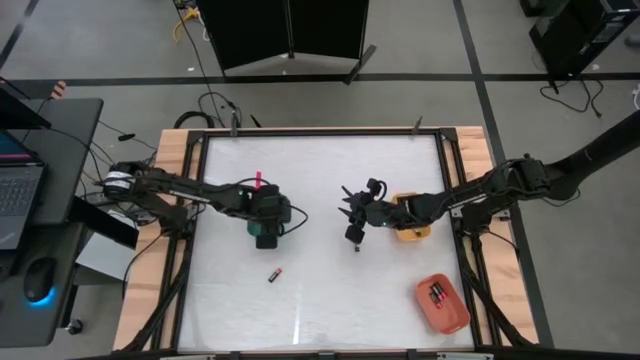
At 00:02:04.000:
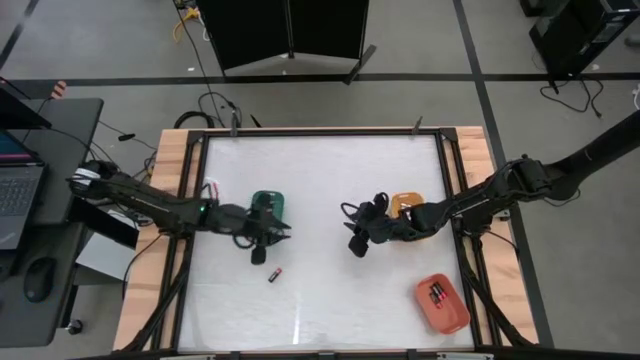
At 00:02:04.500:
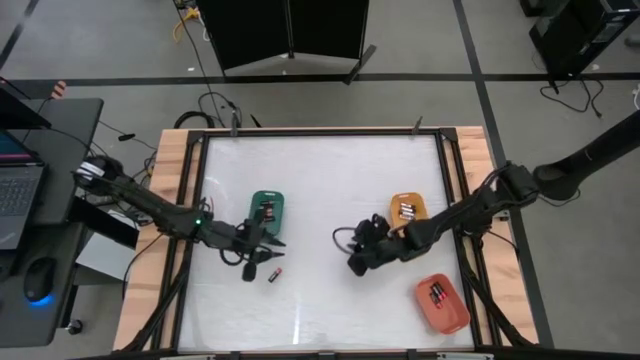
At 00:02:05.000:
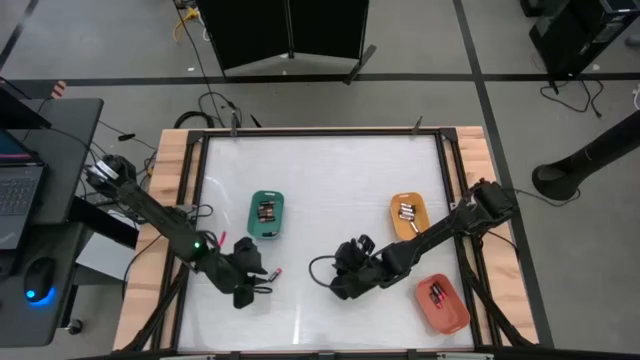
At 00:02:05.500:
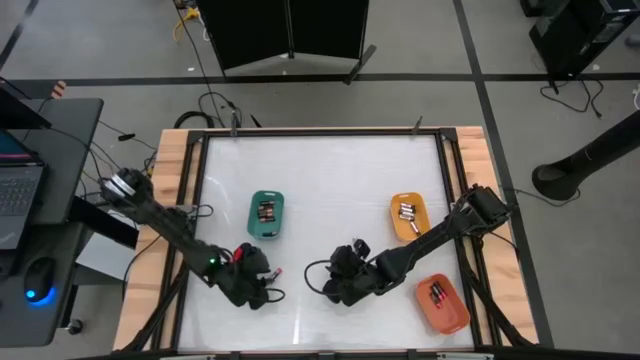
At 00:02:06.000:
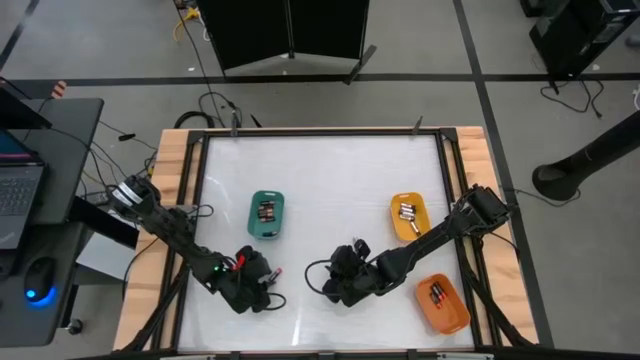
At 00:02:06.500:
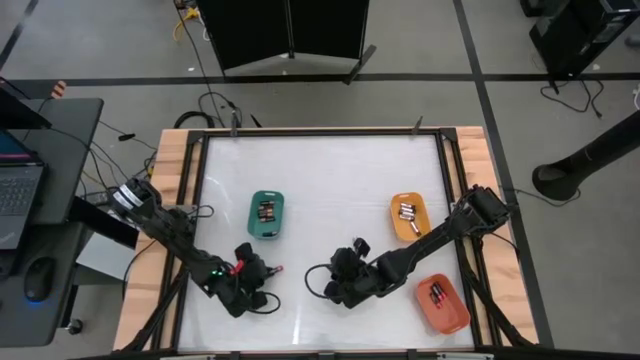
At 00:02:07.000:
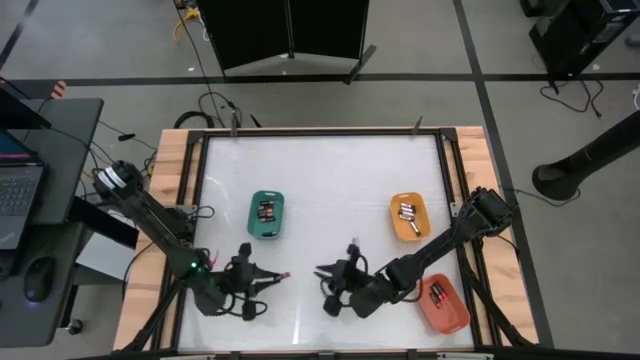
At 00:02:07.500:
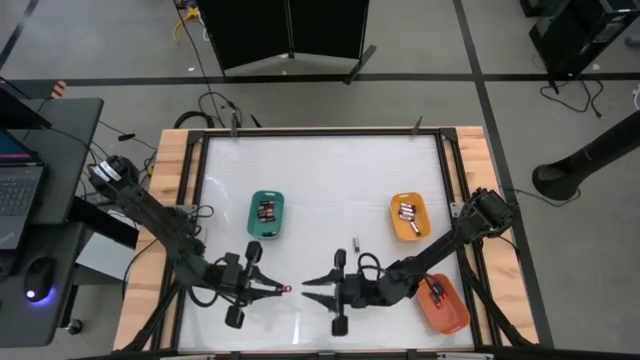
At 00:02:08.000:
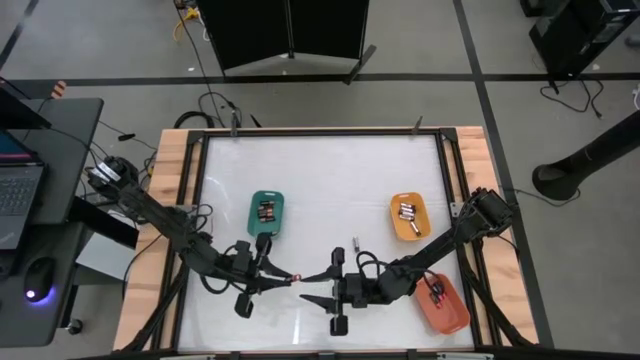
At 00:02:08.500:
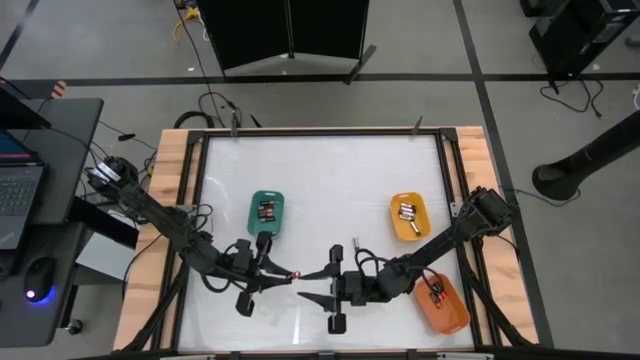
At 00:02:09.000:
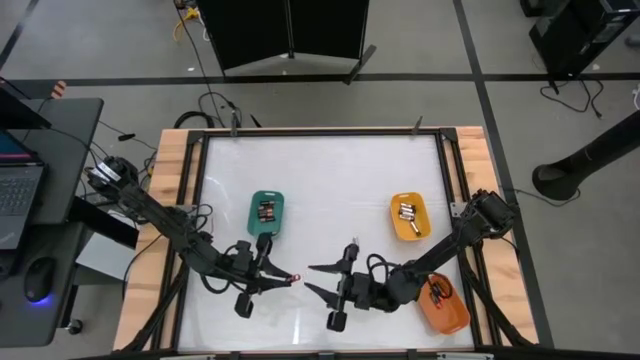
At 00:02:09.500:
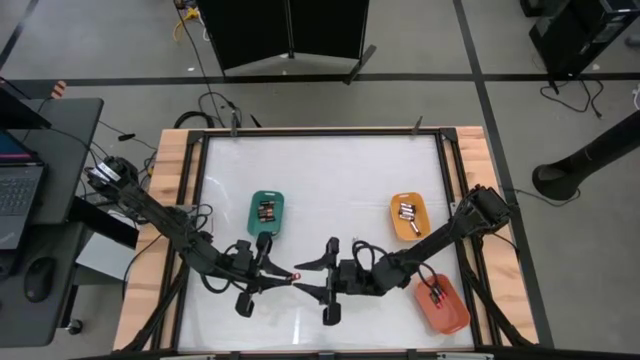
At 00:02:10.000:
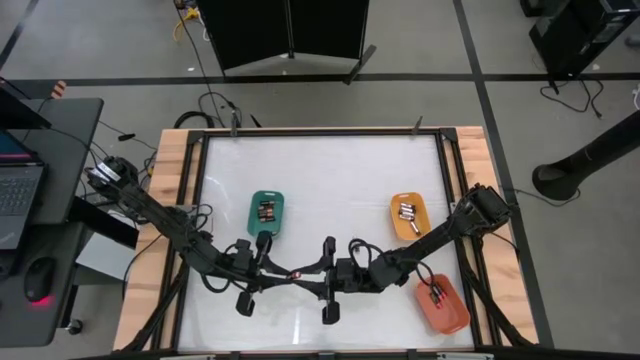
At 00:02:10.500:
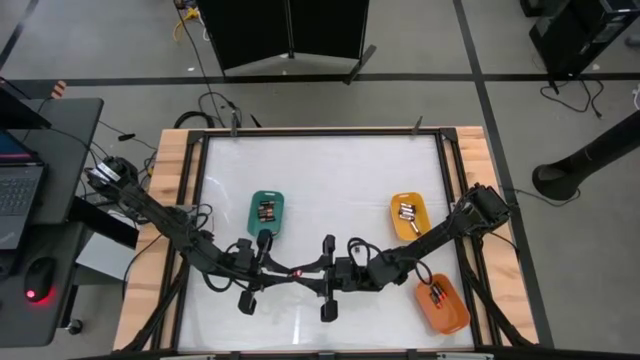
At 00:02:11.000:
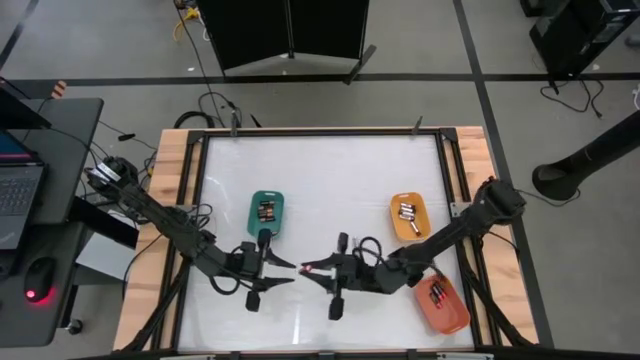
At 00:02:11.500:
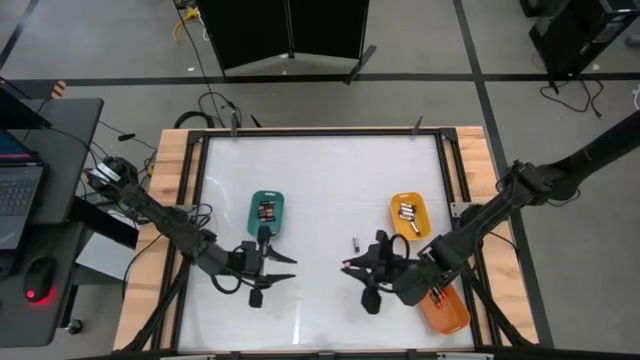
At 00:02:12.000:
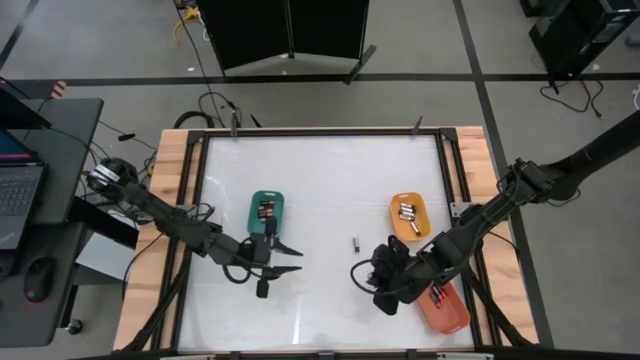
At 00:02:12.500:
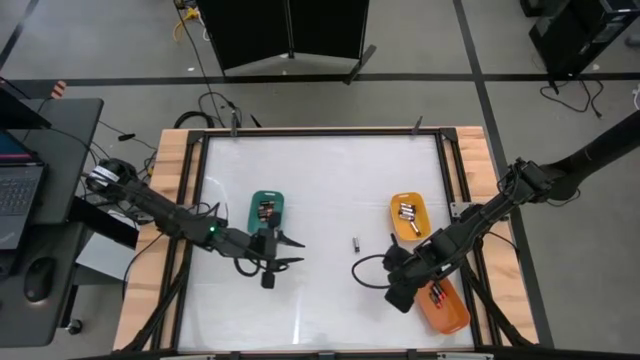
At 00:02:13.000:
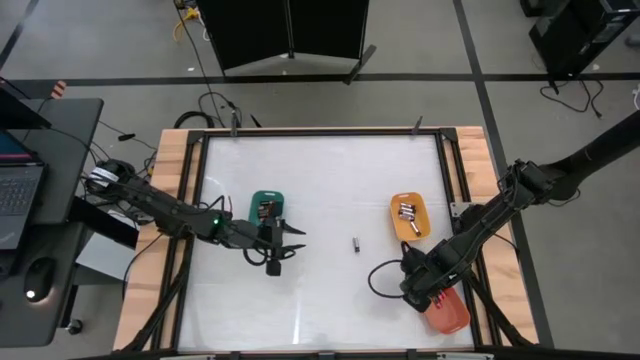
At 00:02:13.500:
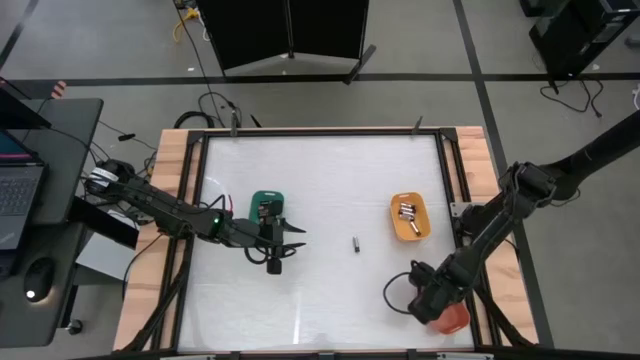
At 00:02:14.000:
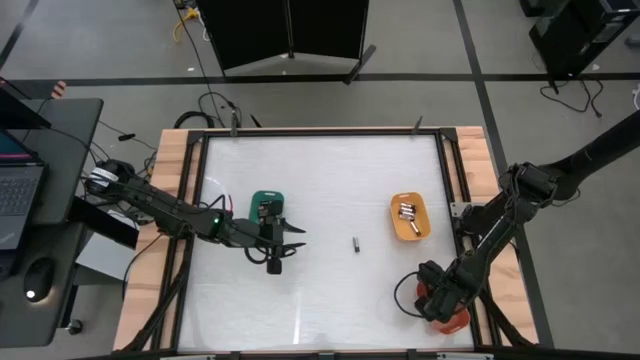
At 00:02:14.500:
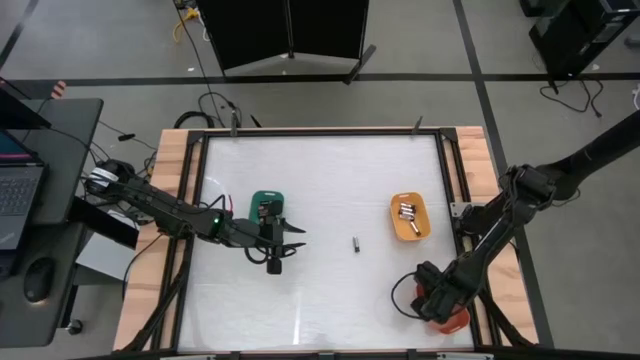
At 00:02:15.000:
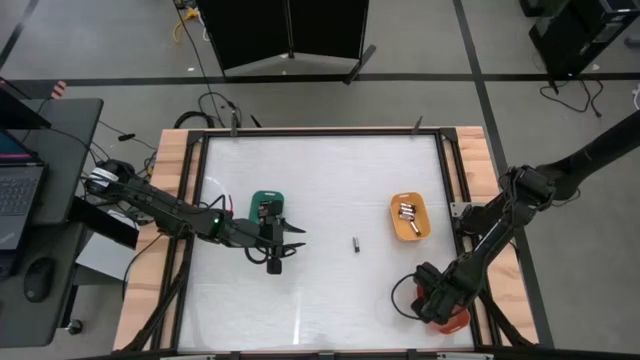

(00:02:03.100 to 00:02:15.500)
Task: Sort batteries
Put the black and red battery into the orange bin

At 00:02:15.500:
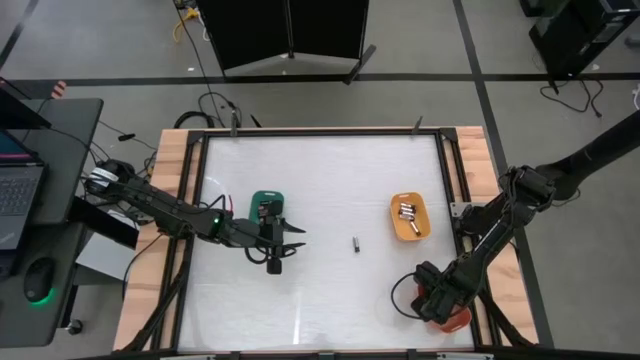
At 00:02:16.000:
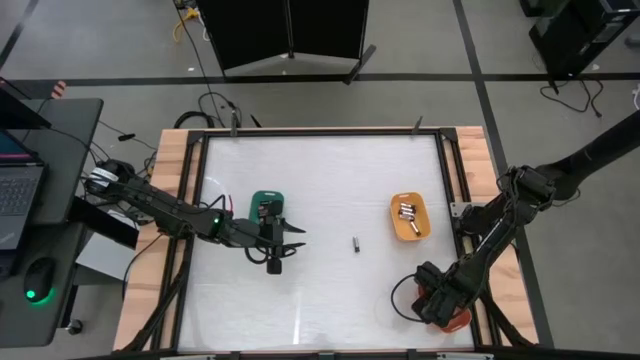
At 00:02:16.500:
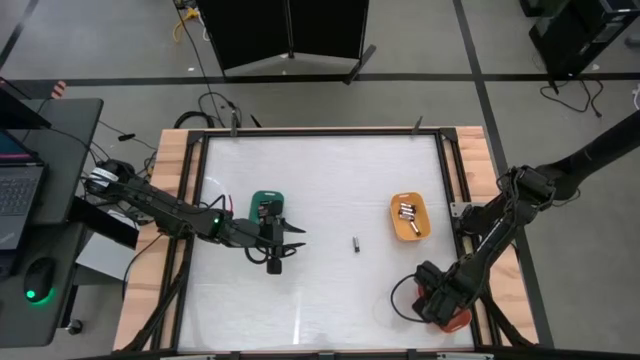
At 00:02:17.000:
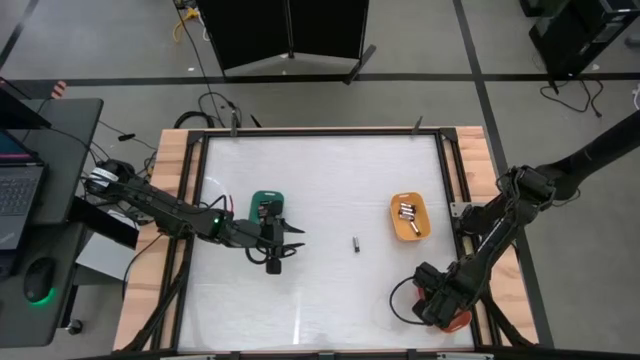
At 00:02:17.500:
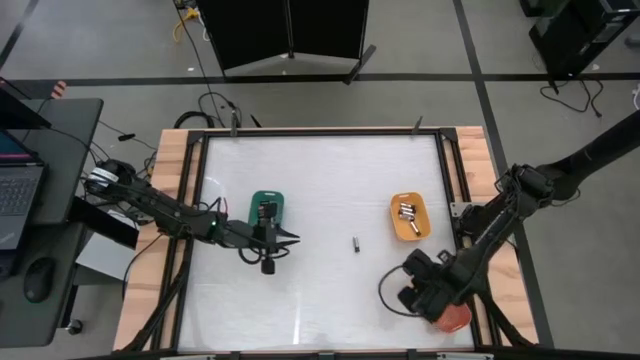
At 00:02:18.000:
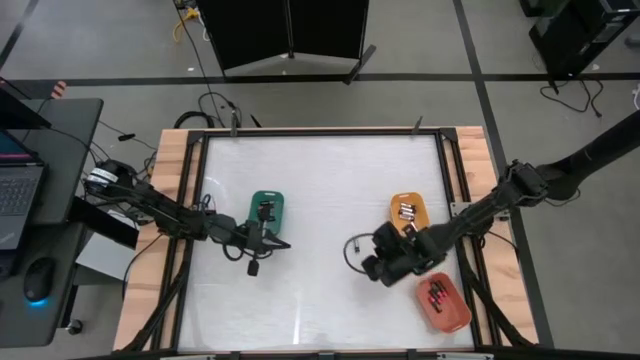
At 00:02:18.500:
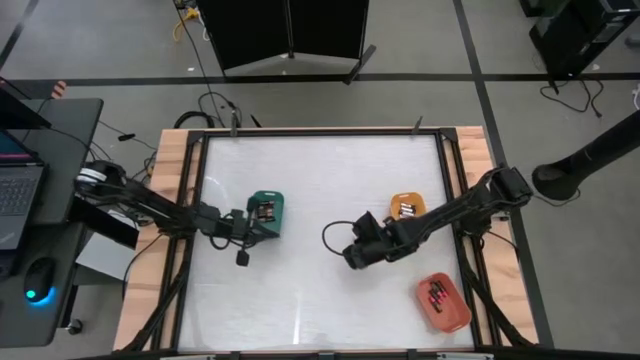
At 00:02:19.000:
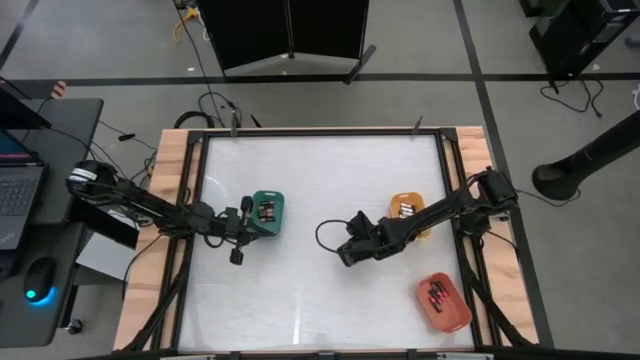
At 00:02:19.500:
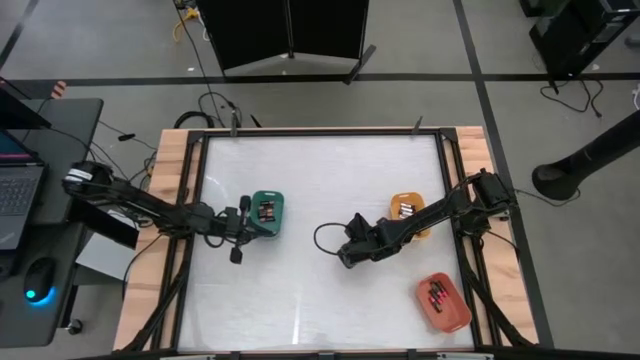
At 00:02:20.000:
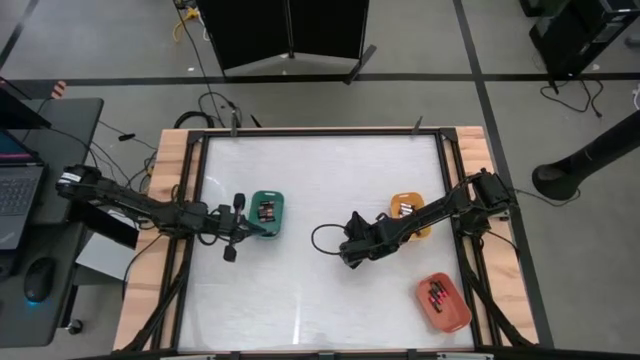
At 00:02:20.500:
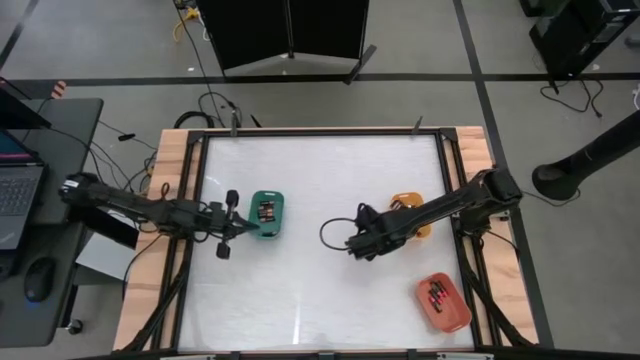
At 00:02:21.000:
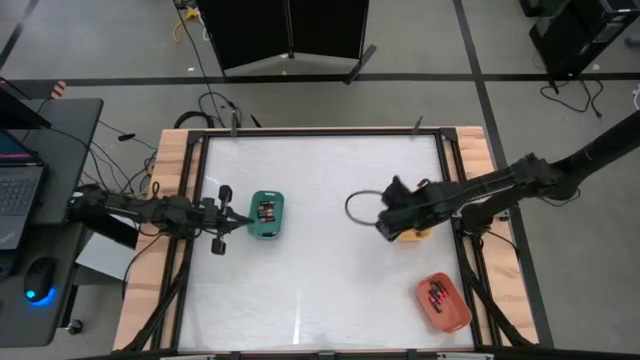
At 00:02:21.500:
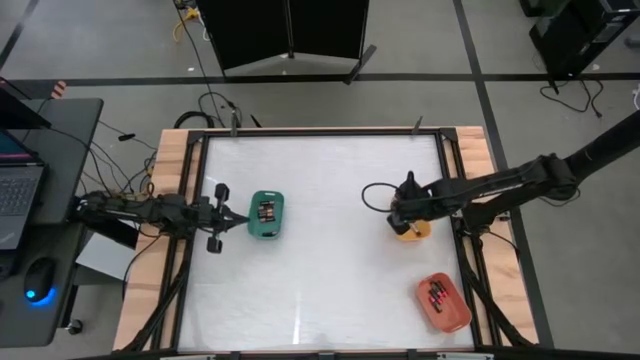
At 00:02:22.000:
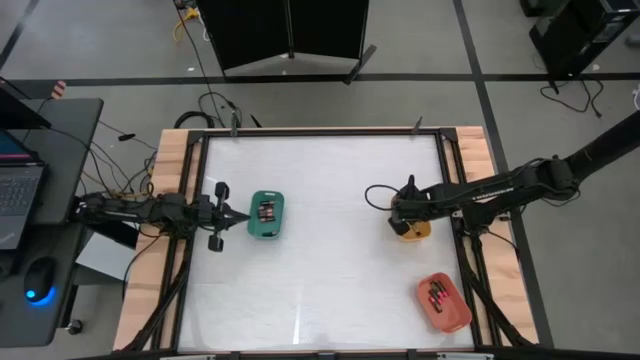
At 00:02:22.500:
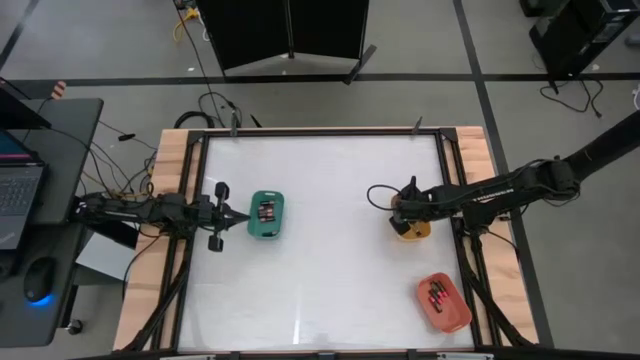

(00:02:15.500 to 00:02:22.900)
Put the silver battery into the yellow bin

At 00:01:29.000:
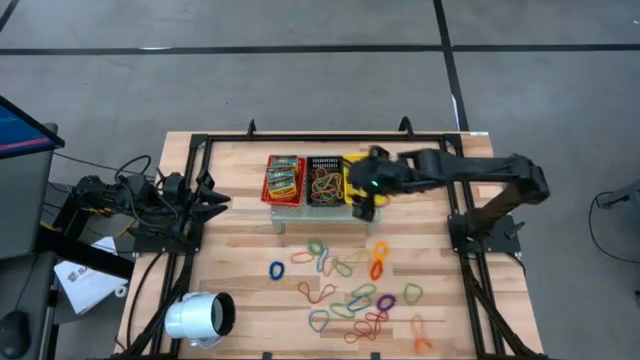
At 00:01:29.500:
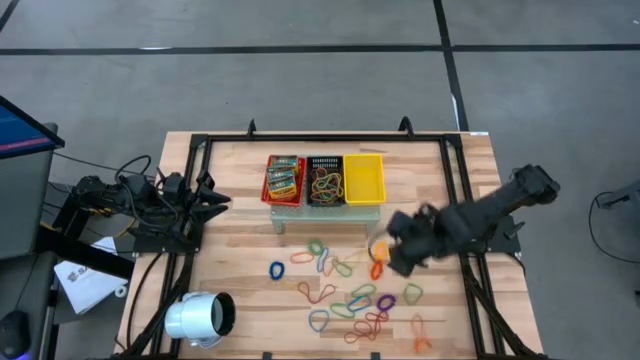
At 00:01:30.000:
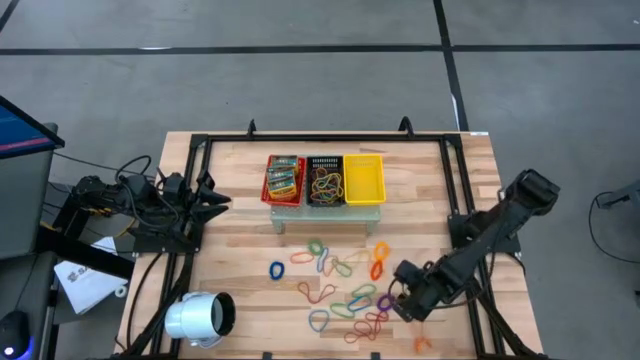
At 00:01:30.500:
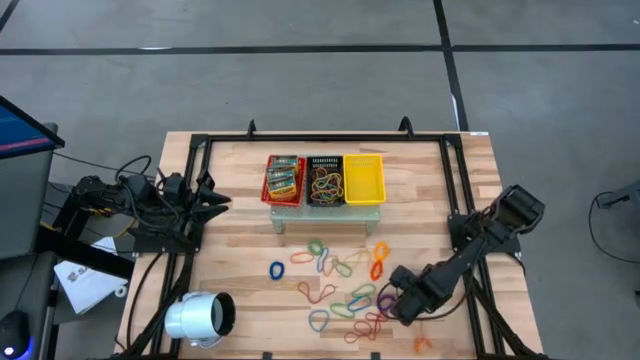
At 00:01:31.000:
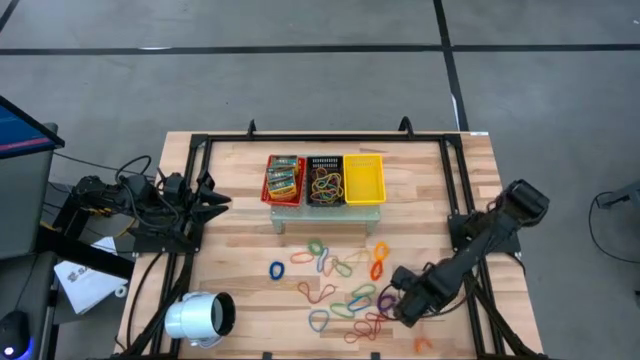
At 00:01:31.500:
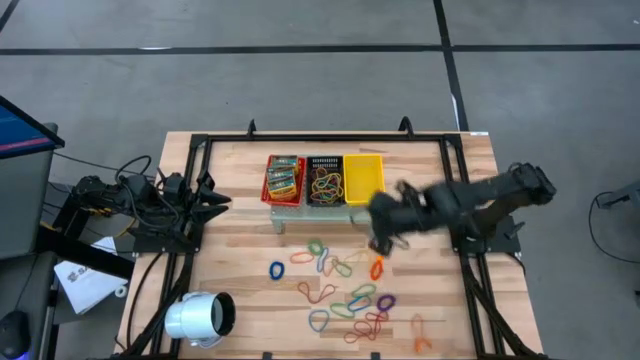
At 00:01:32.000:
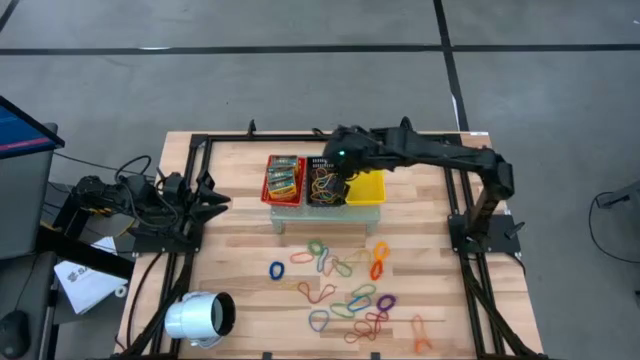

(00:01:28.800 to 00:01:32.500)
Task: Pick & Place Office Desk Supplies
Put the green rubber band into the black bin on the shelf
